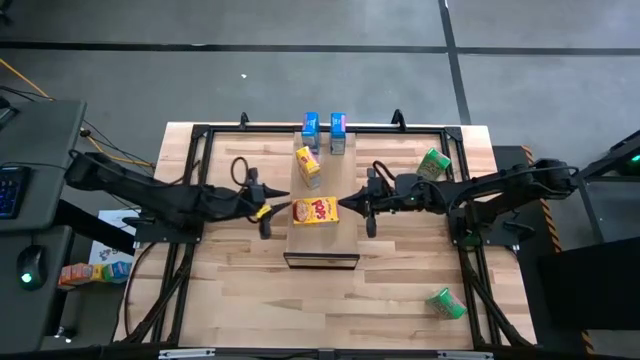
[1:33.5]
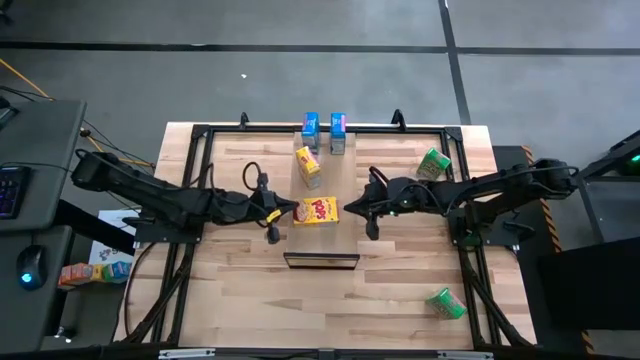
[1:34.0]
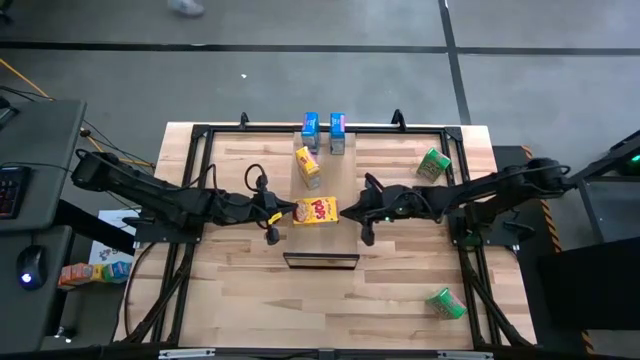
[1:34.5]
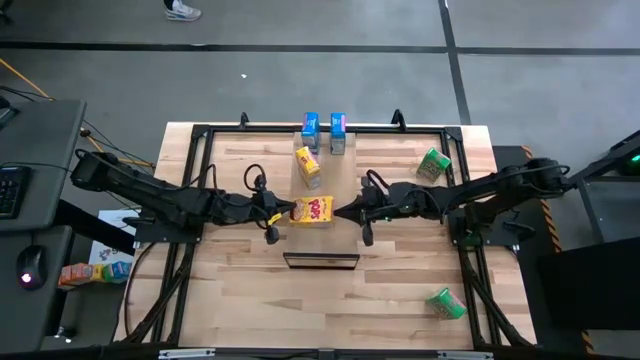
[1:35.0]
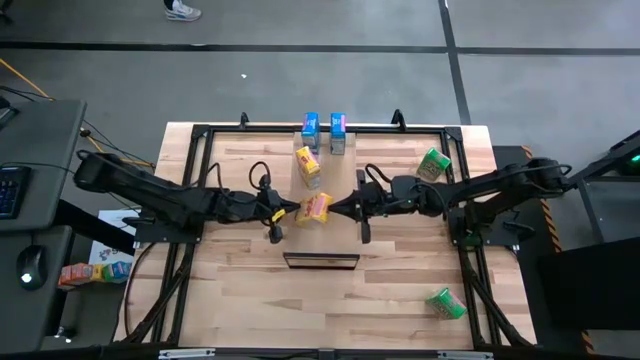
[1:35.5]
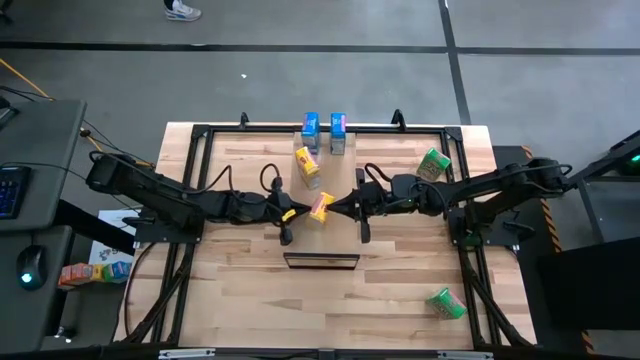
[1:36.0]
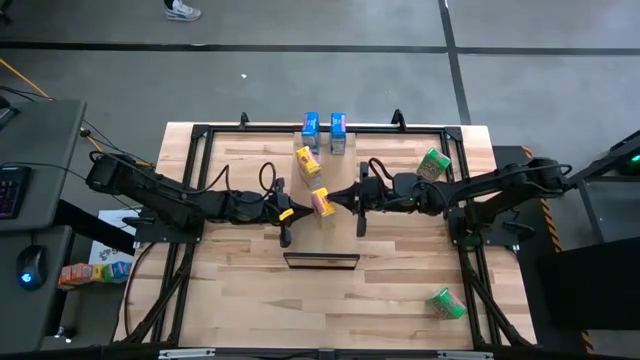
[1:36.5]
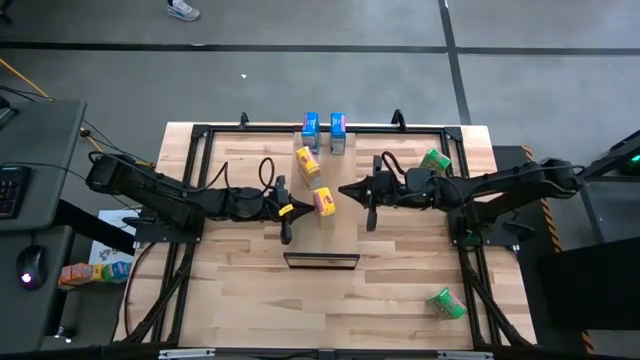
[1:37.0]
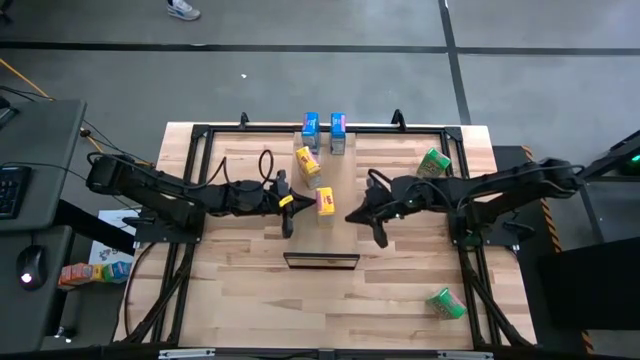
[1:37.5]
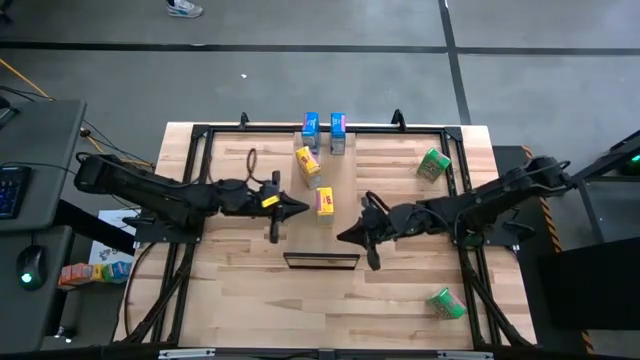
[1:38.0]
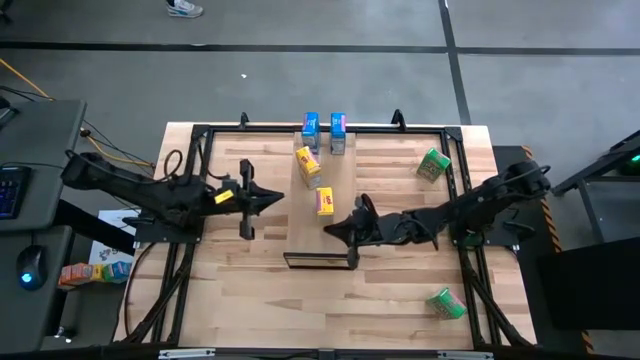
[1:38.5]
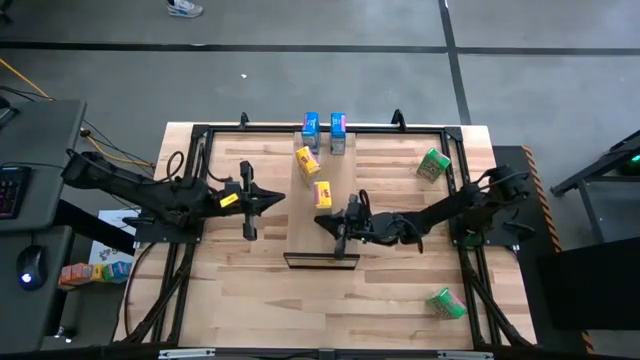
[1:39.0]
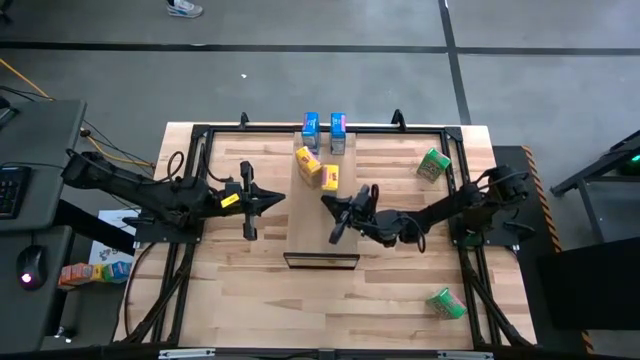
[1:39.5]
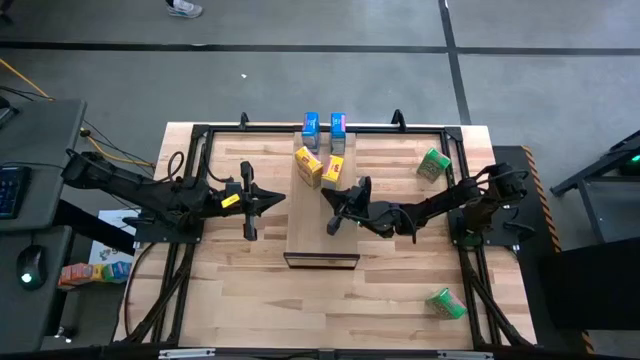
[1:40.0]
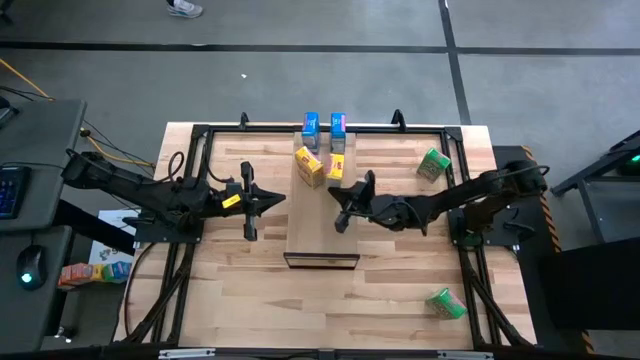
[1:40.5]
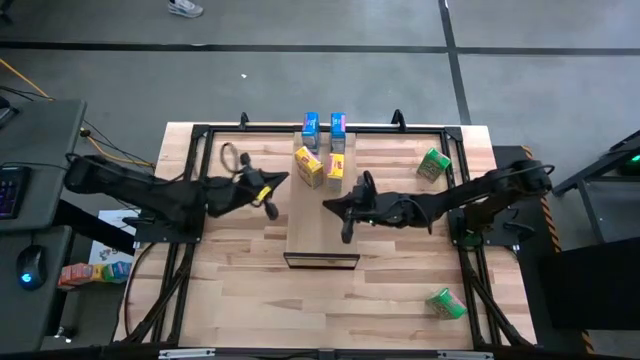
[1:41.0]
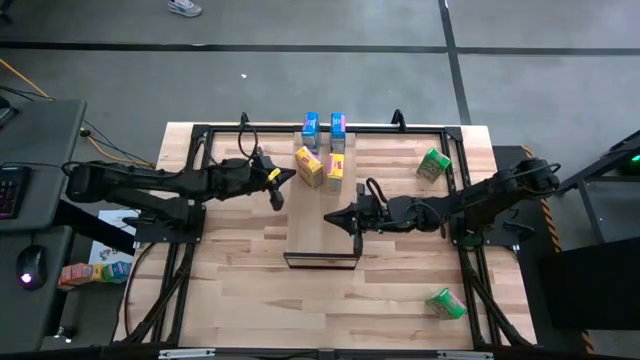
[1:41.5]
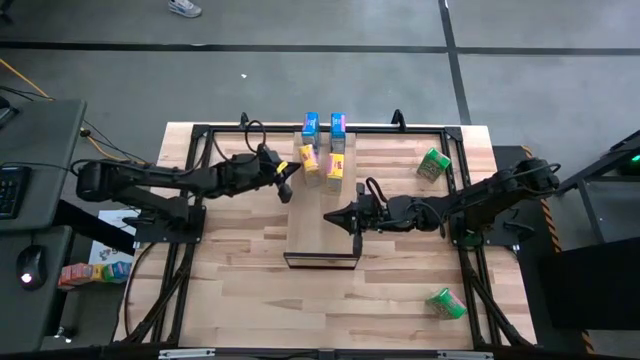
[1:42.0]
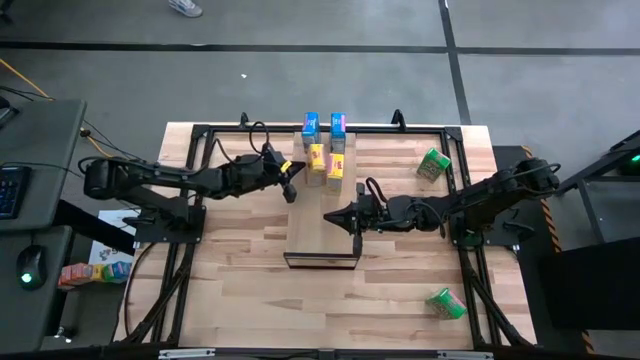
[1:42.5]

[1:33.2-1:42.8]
Task: Stack cereal on shelf
Put the yellow cereal box on the shelf

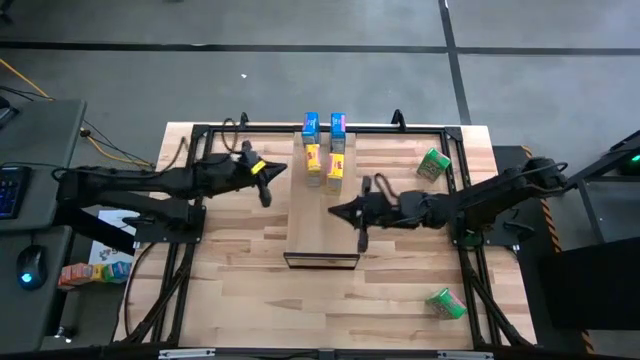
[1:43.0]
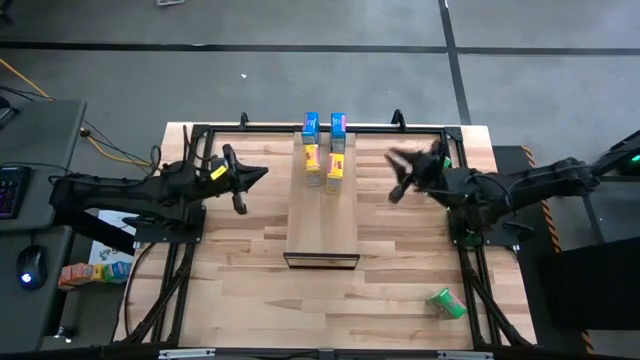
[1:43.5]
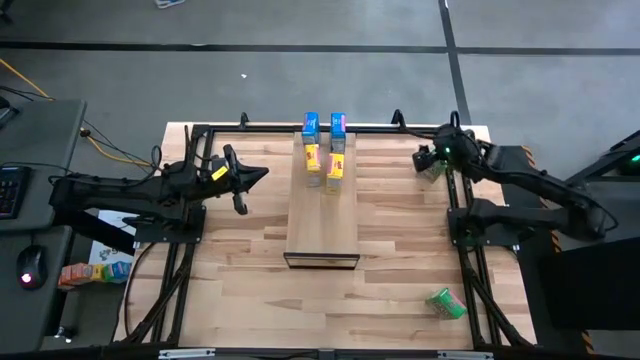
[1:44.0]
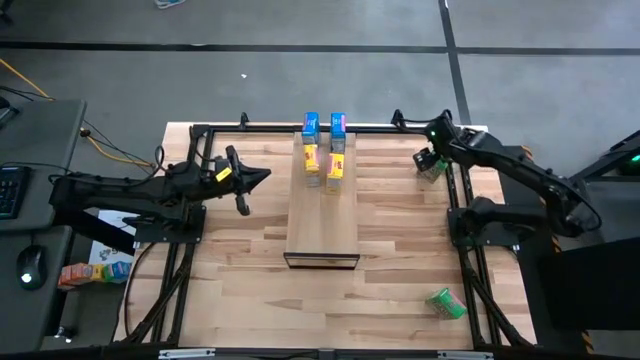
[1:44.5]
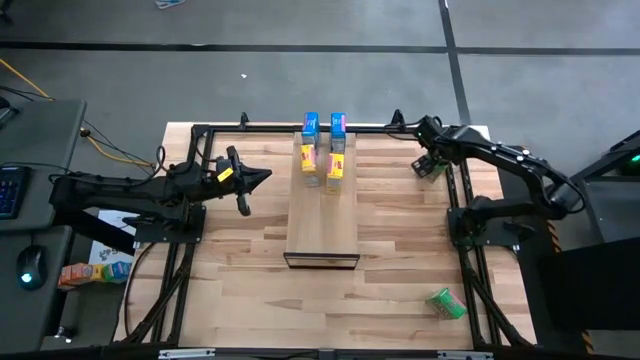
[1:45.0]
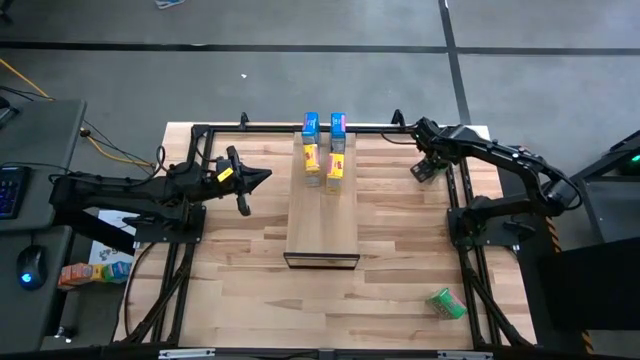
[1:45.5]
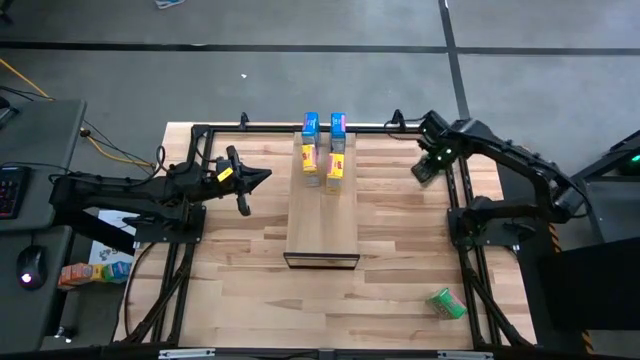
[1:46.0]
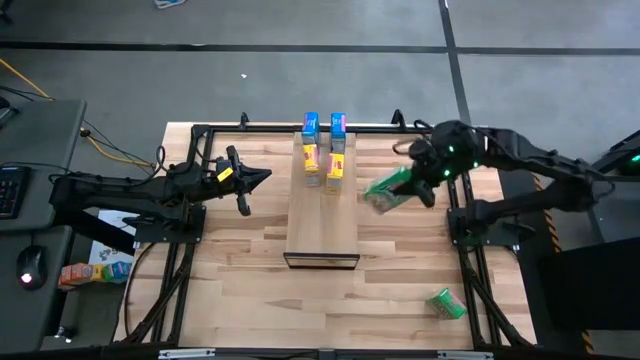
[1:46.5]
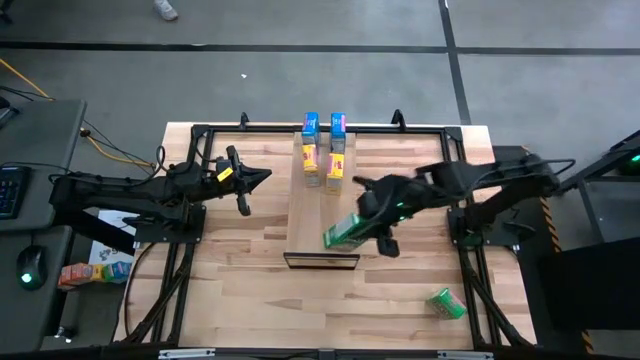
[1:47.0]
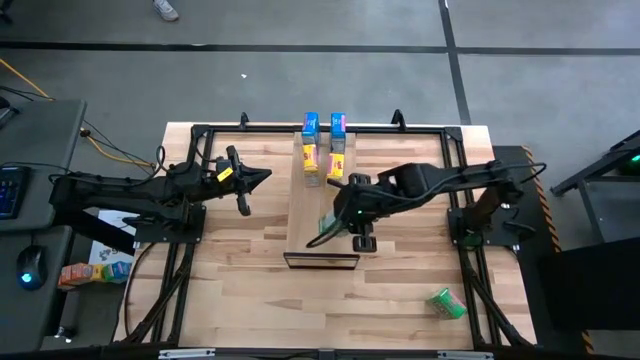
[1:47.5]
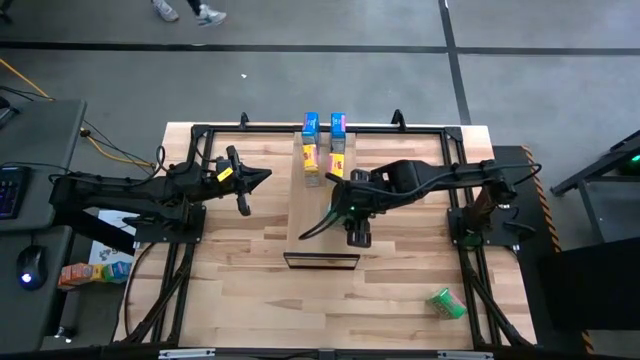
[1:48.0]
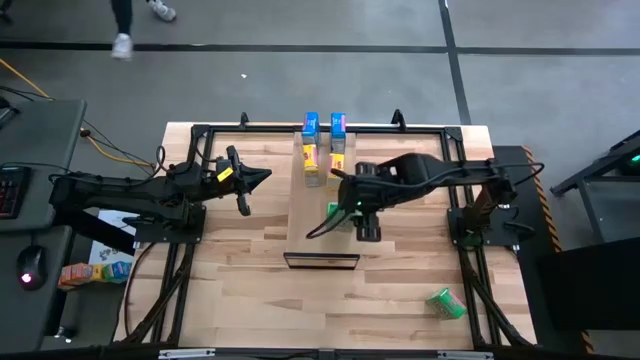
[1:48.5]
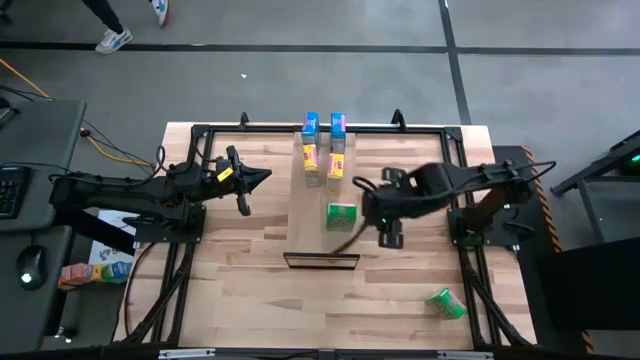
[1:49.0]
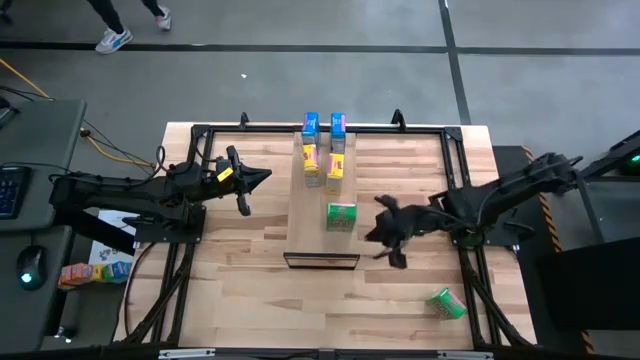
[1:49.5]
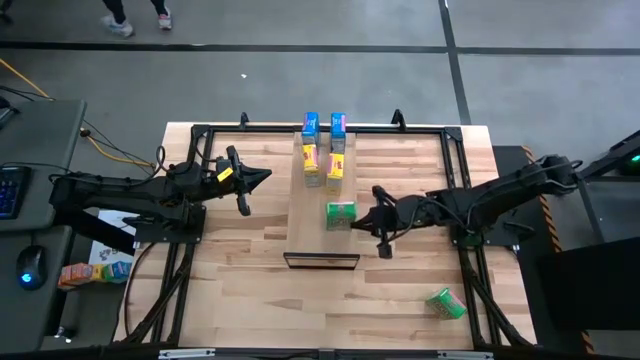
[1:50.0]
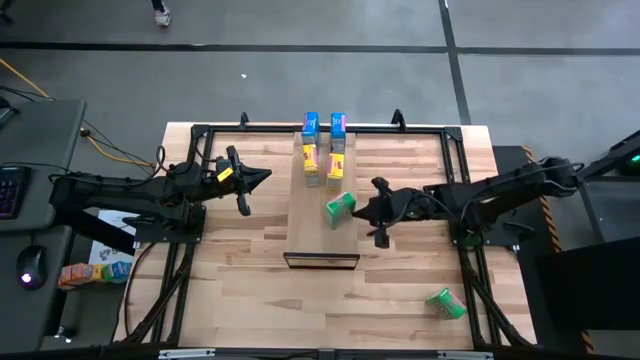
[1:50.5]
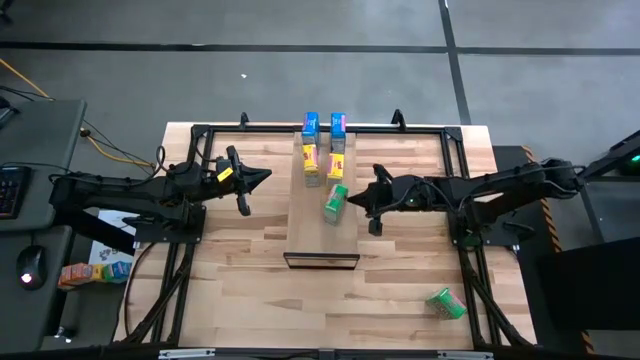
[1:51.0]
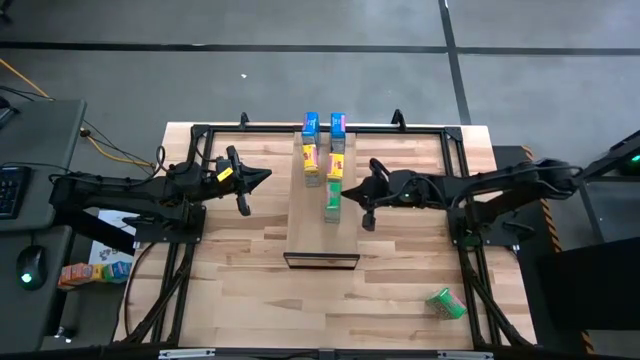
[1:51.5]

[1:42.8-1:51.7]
Put the top green cereal box on the shelf

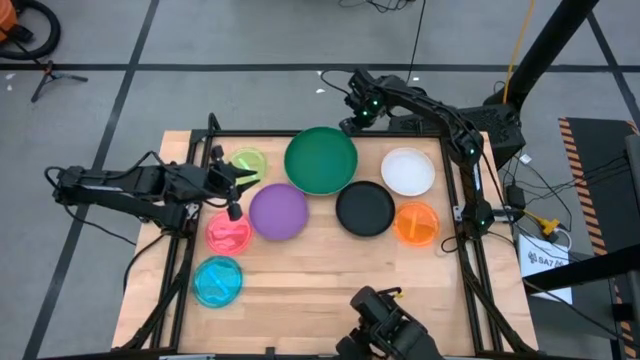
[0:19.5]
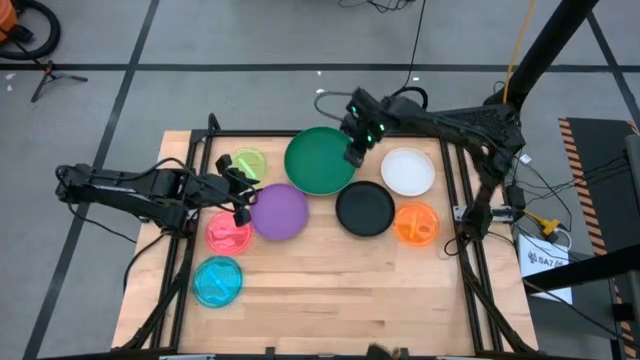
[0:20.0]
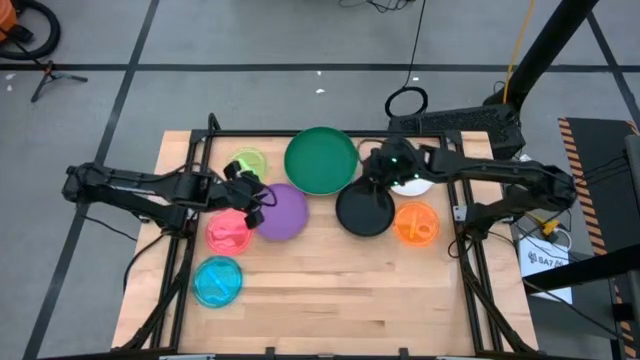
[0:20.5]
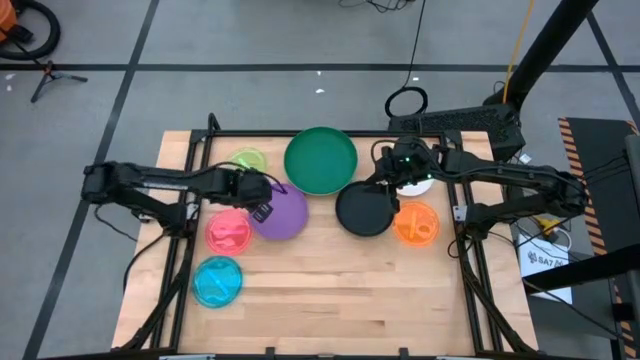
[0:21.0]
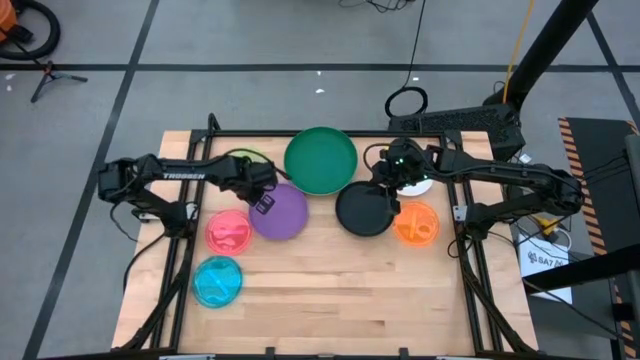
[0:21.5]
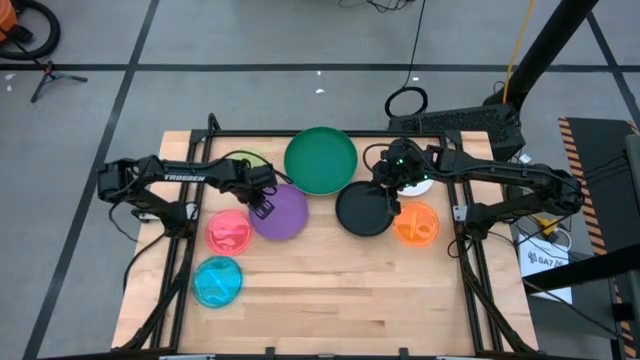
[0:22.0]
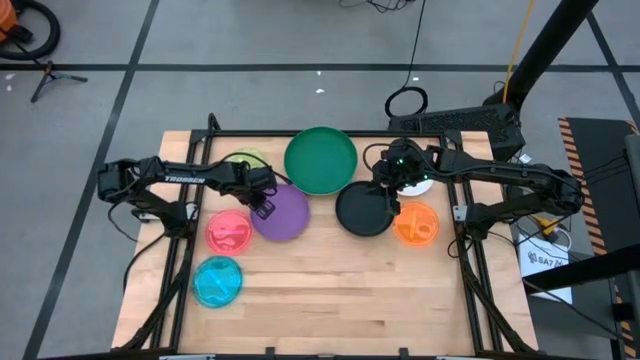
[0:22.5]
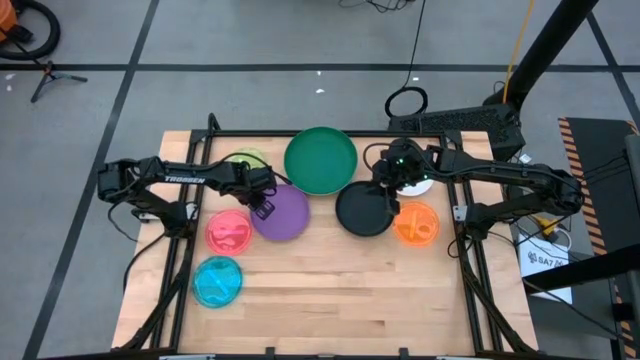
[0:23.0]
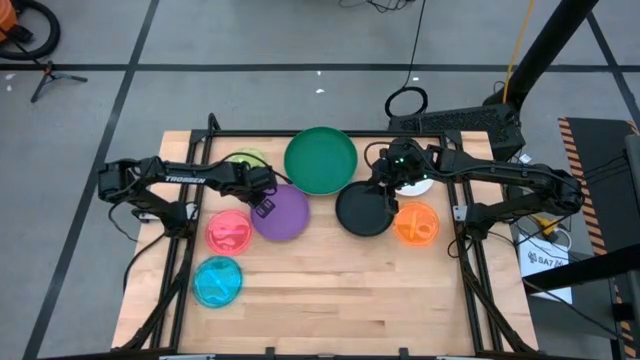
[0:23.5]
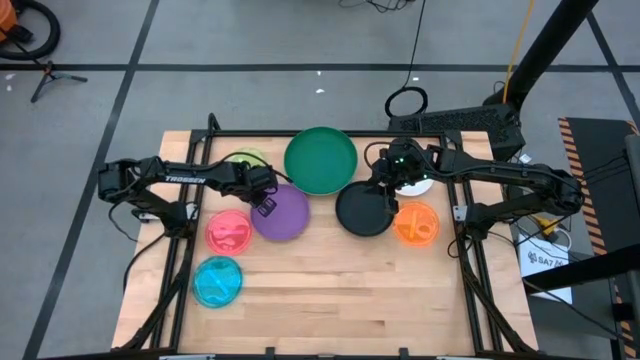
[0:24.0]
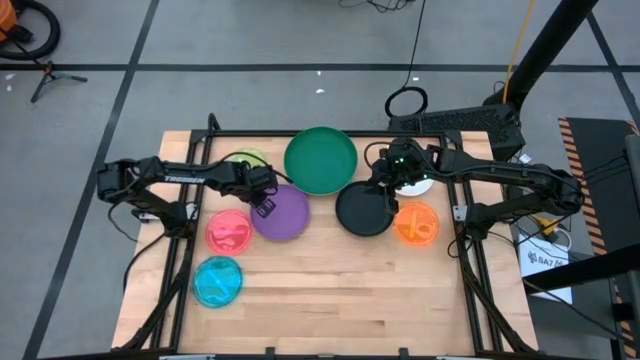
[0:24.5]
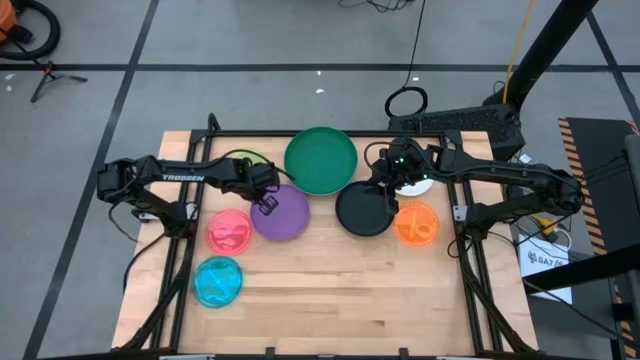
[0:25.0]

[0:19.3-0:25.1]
Task: Stack plastic plates
Stack the purple plate on top the dark green plate
